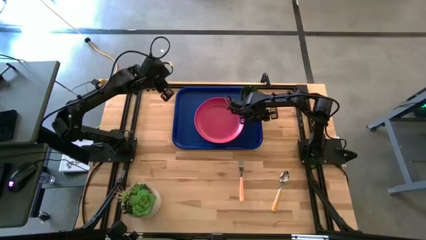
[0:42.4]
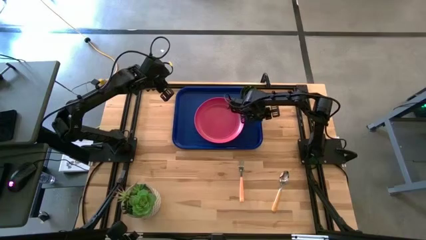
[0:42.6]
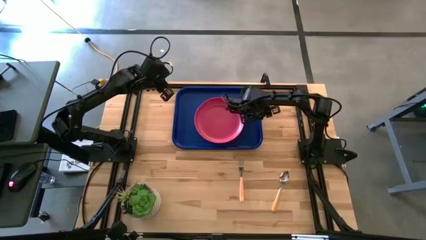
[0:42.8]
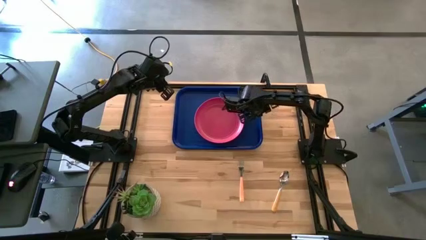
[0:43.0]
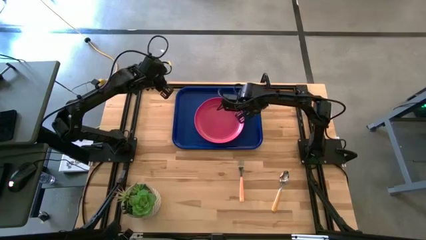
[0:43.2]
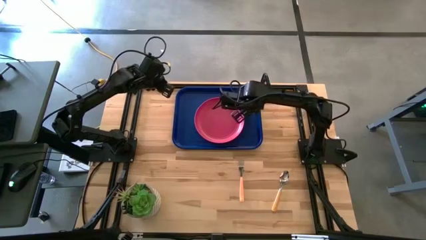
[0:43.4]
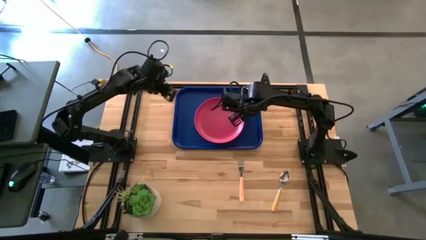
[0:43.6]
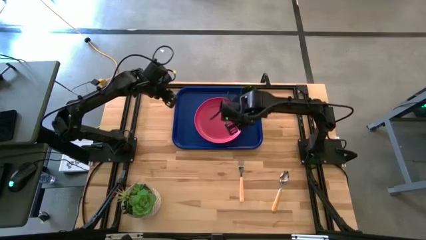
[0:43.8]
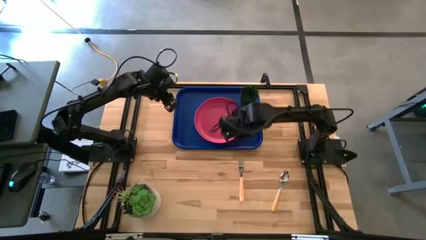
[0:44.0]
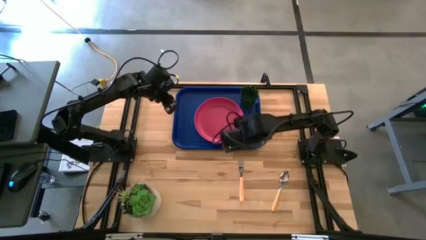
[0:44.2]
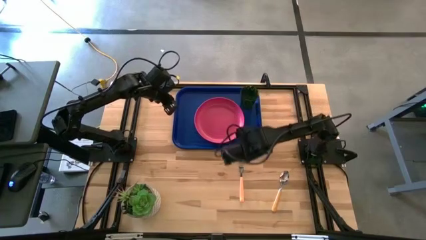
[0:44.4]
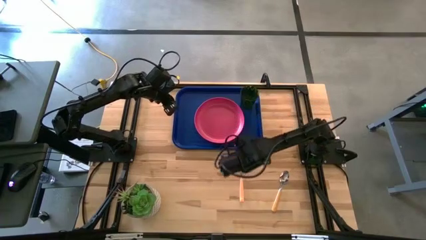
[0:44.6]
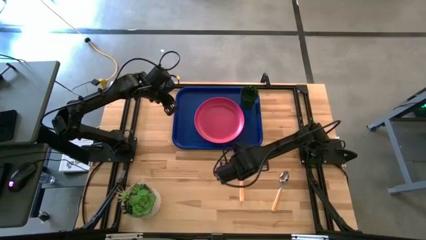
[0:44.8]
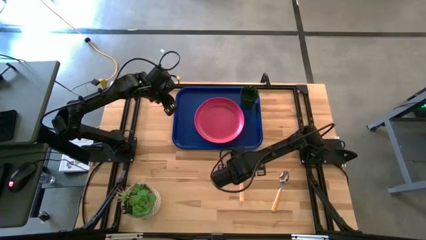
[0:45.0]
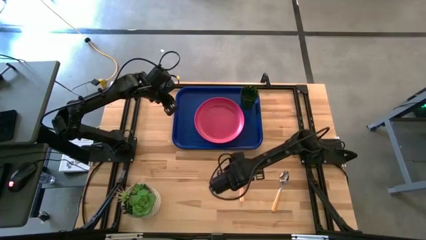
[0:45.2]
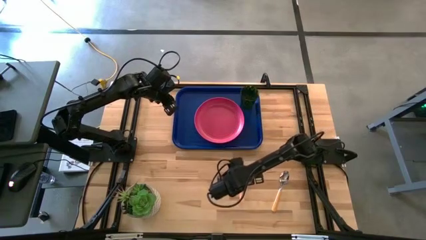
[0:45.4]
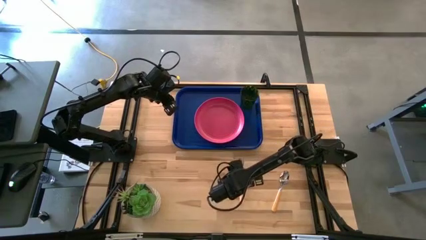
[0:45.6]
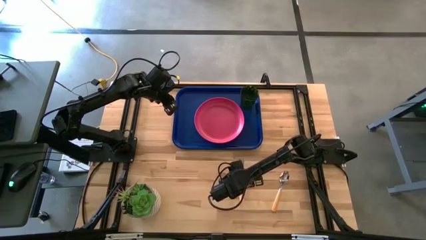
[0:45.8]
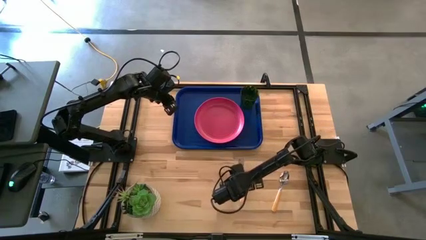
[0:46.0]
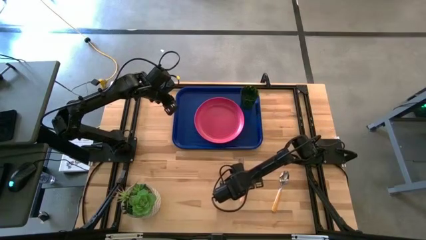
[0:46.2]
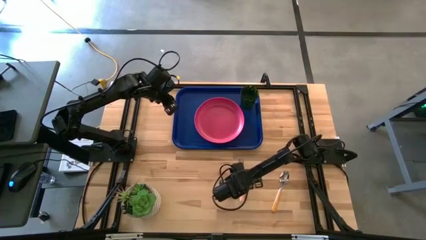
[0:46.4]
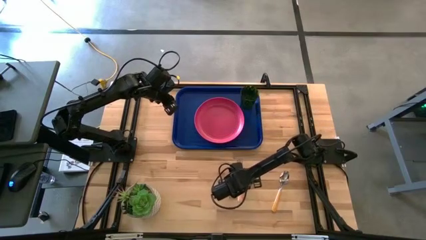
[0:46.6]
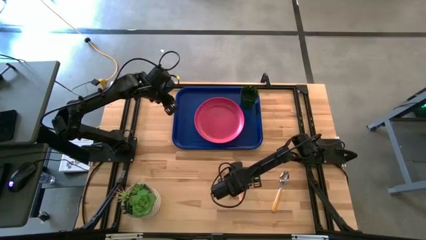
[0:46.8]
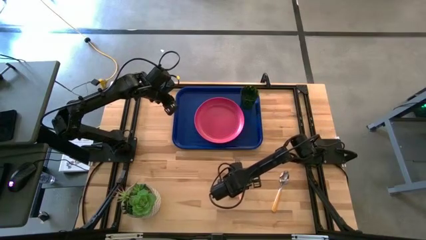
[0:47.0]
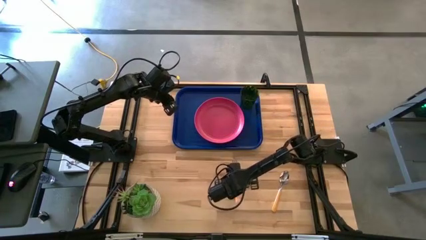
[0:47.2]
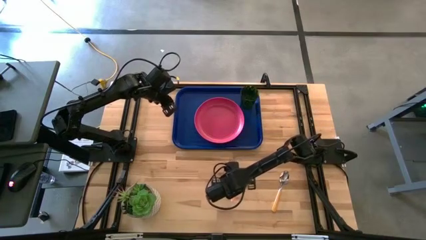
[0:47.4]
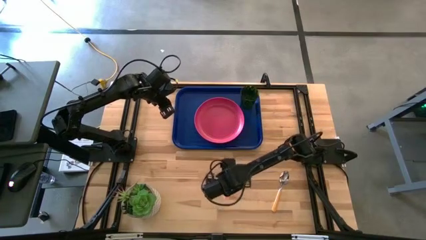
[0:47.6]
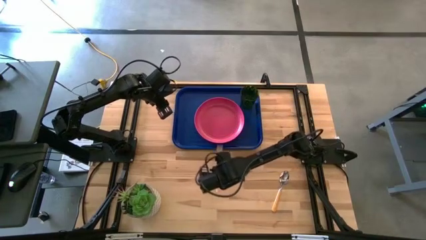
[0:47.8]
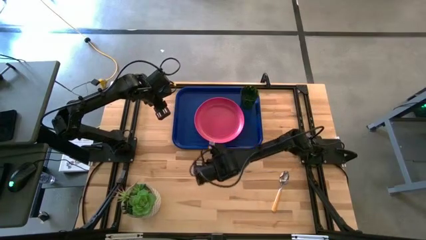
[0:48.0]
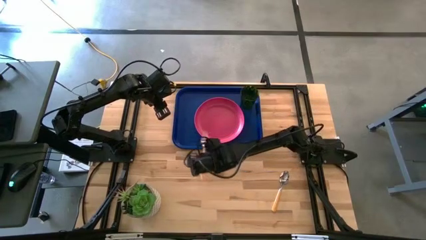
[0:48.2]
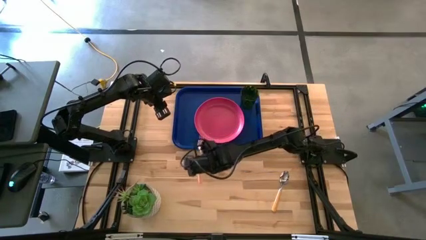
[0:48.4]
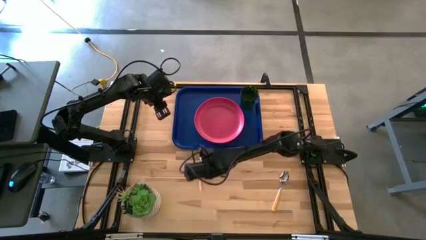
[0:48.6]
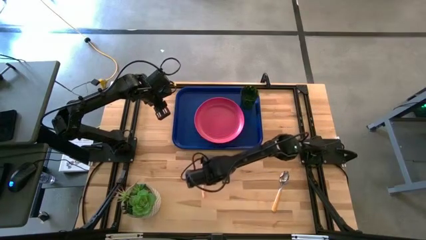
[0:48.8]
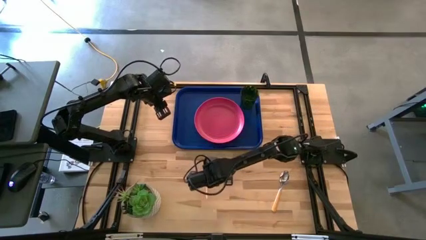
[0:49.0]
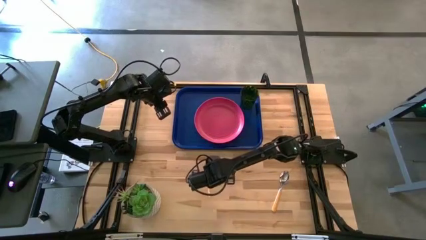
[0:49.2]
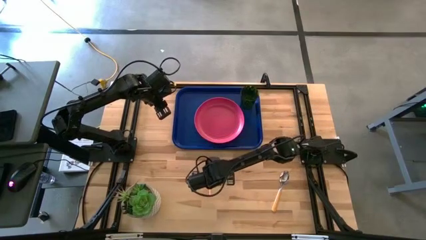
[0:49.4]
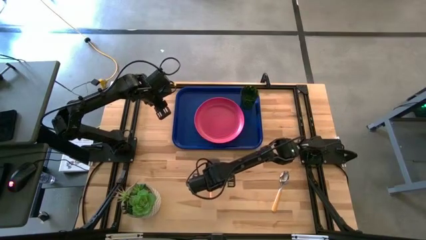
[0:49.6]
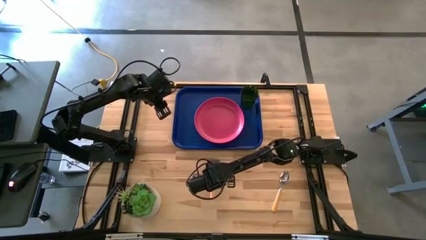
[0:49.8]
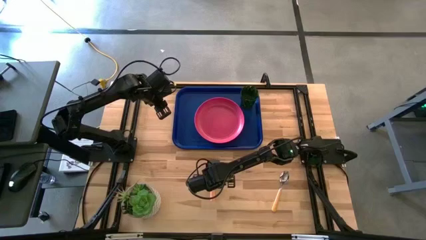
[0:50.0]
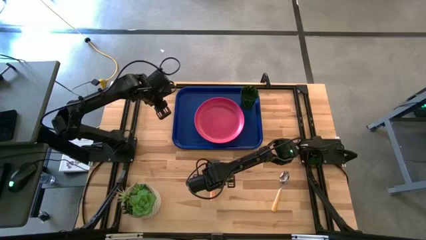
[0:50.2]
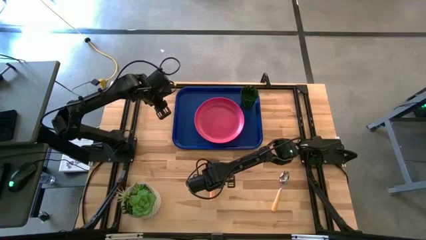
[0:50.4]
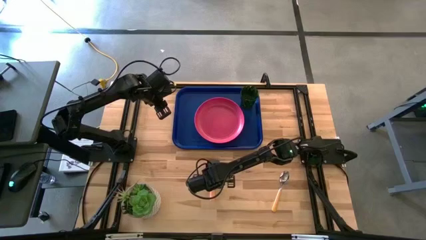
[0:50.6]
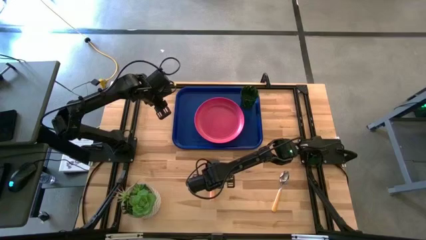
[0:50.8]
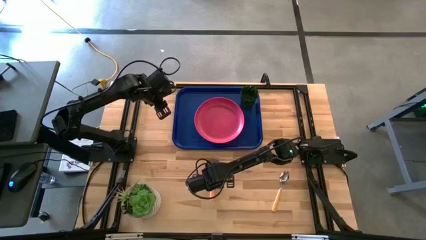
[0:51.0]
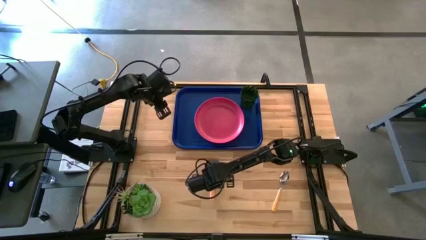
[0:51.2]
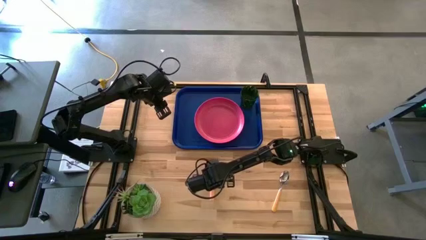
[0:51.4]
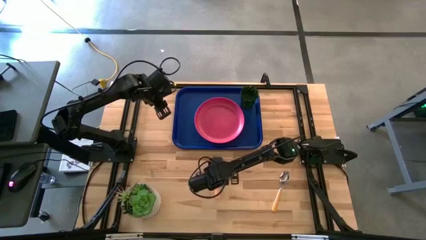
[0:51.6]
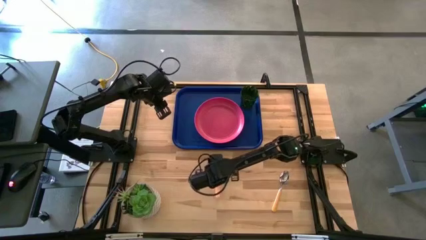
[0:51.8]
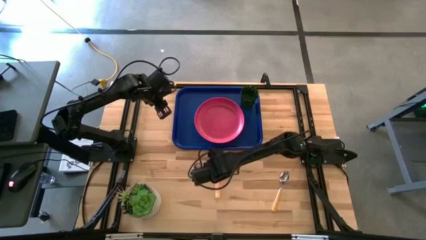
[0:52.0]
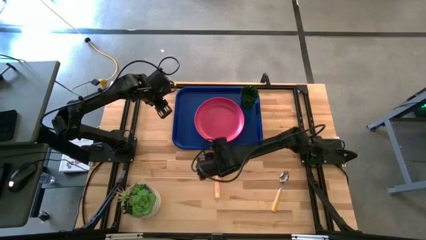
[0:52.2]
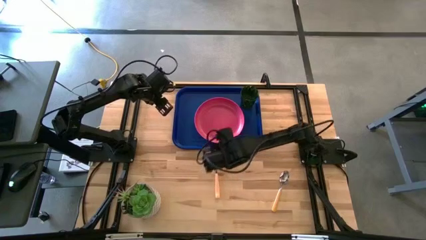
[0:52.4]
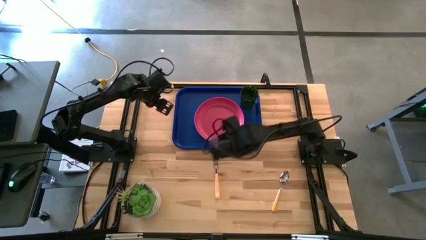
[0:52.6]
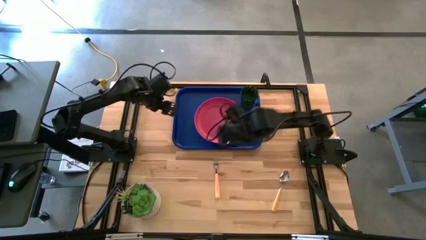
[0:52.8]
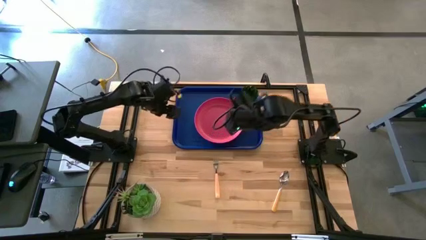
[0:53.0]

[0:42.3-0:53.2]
Task: Pick and place plate/cup/fork/spoon on tray
Put the orange fork to the left side of the pink plate on the blue serving tray
